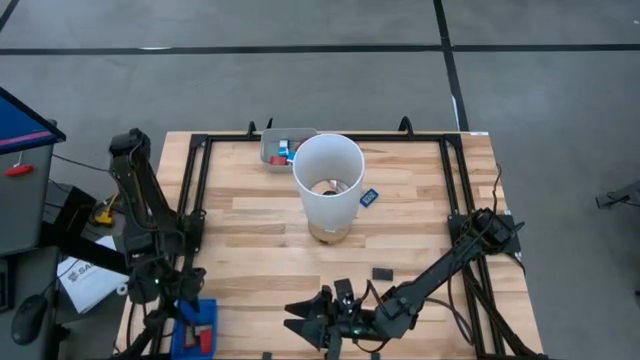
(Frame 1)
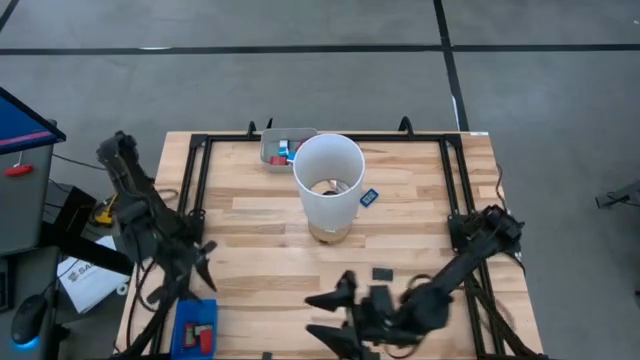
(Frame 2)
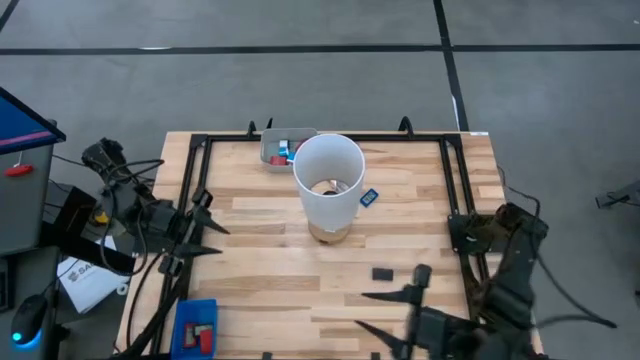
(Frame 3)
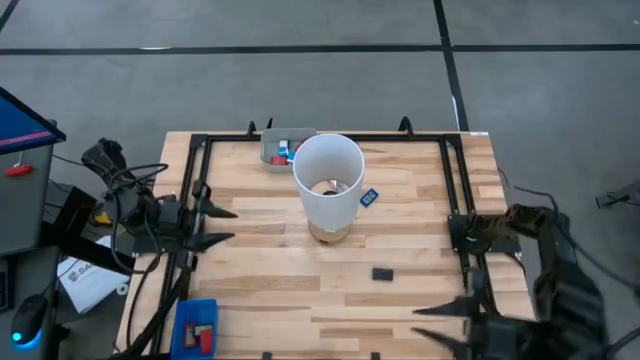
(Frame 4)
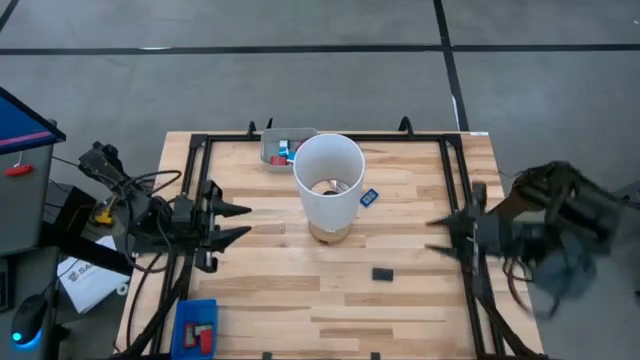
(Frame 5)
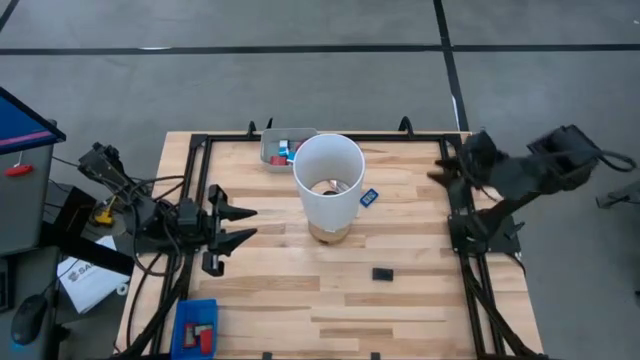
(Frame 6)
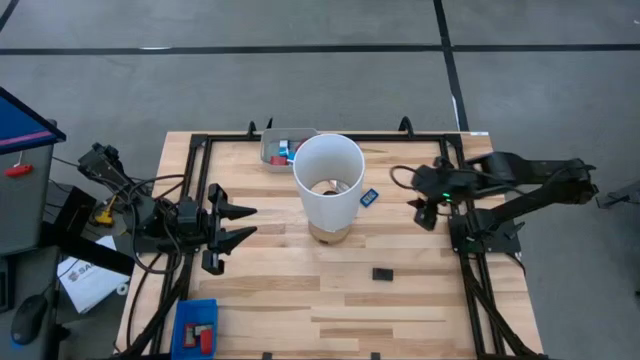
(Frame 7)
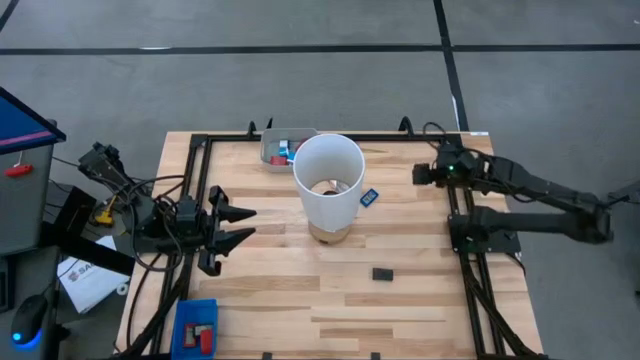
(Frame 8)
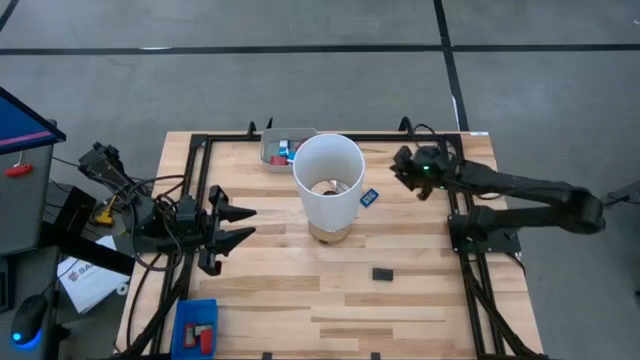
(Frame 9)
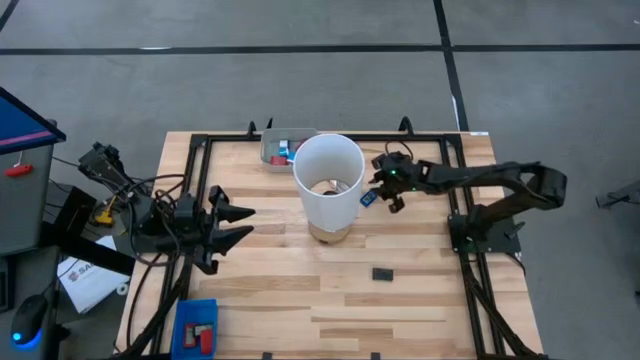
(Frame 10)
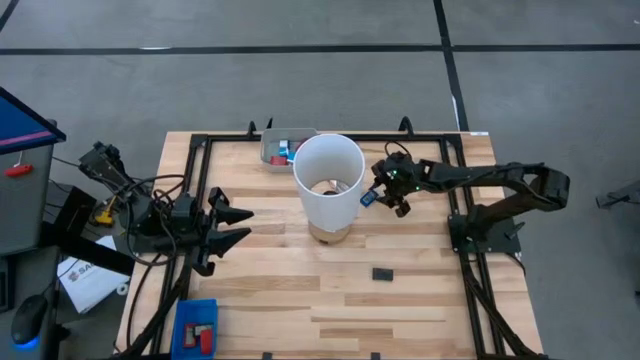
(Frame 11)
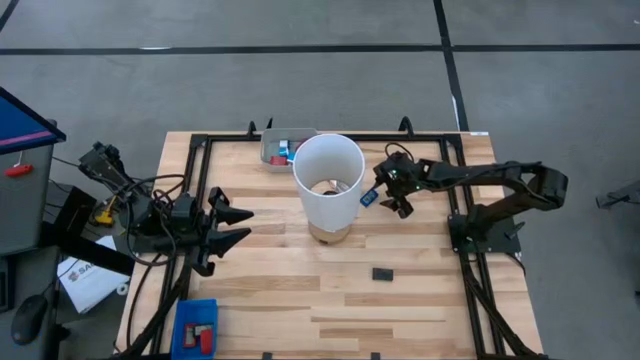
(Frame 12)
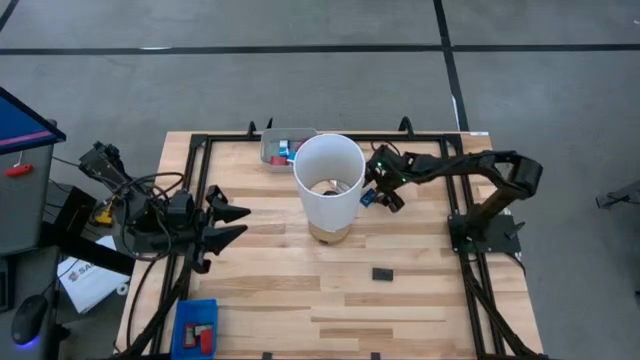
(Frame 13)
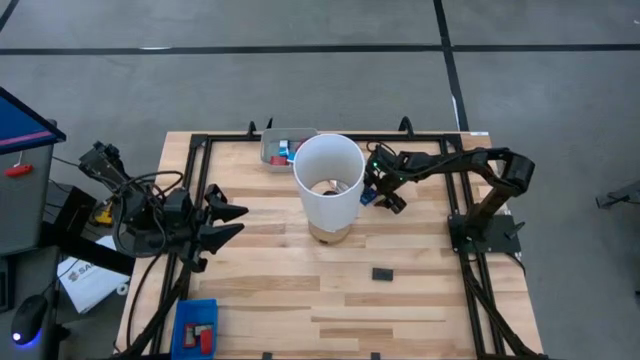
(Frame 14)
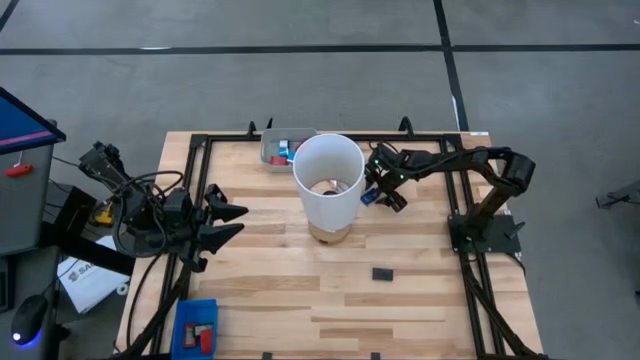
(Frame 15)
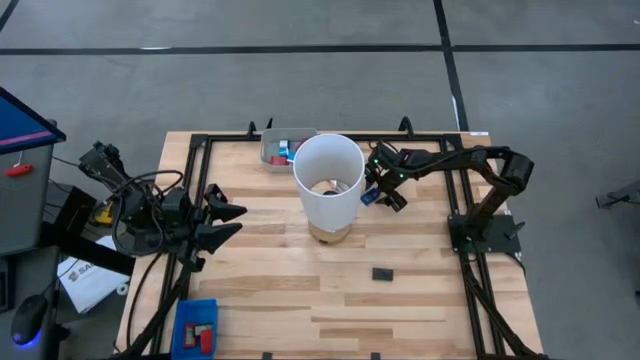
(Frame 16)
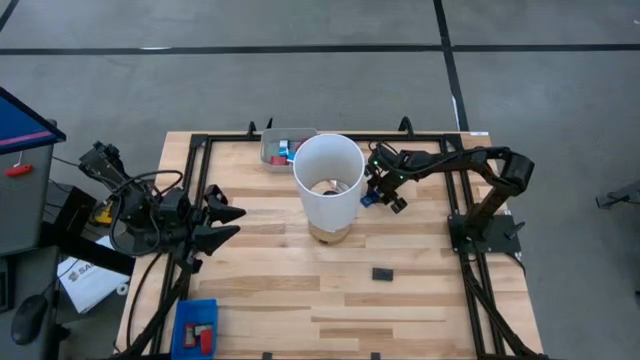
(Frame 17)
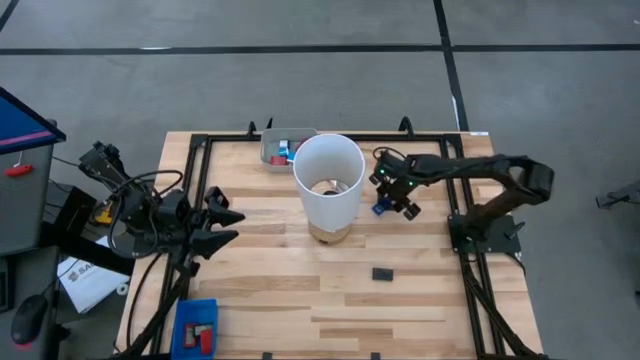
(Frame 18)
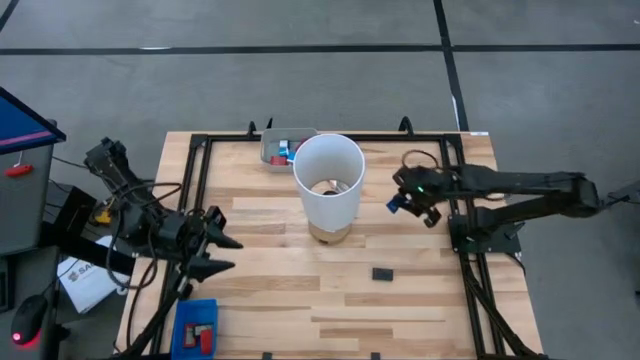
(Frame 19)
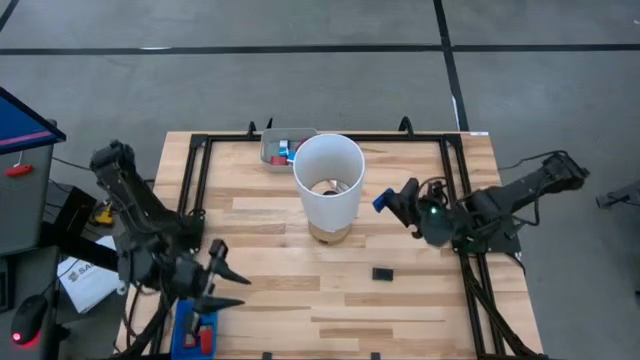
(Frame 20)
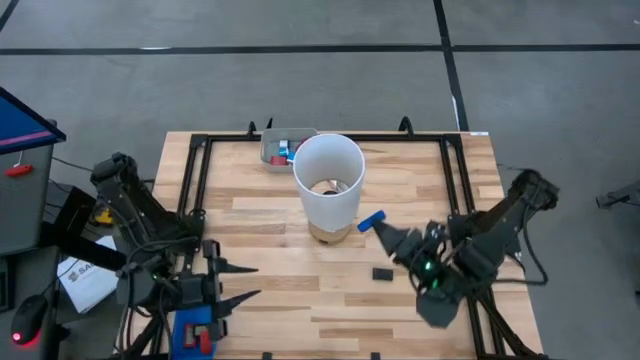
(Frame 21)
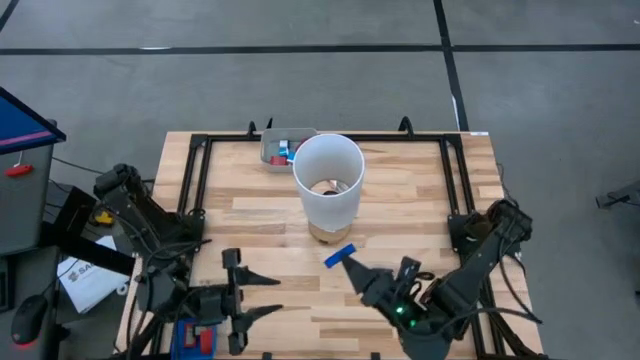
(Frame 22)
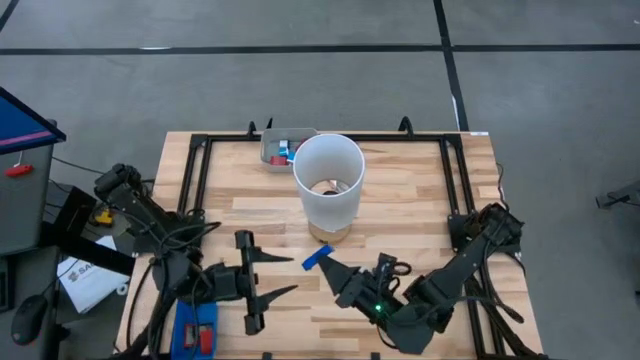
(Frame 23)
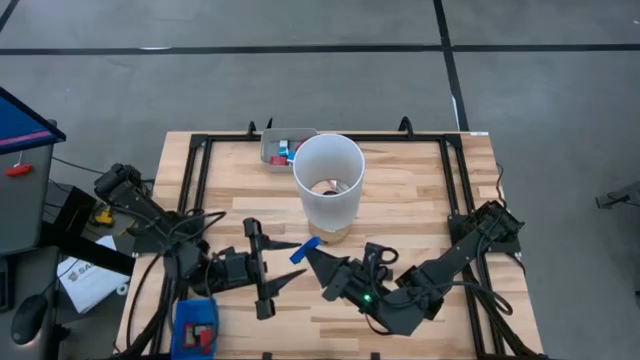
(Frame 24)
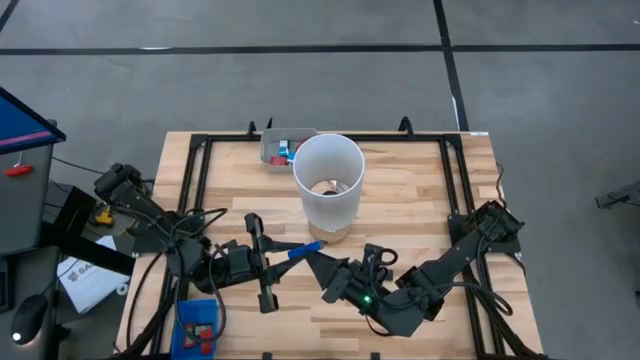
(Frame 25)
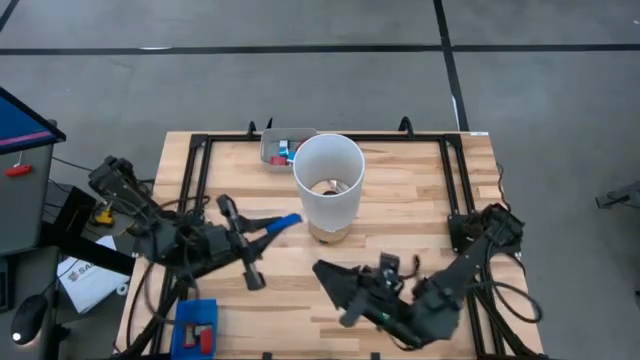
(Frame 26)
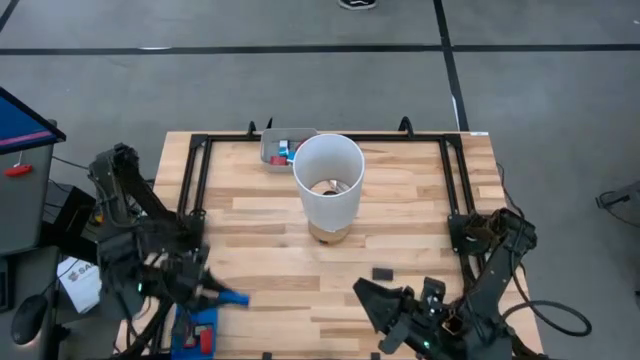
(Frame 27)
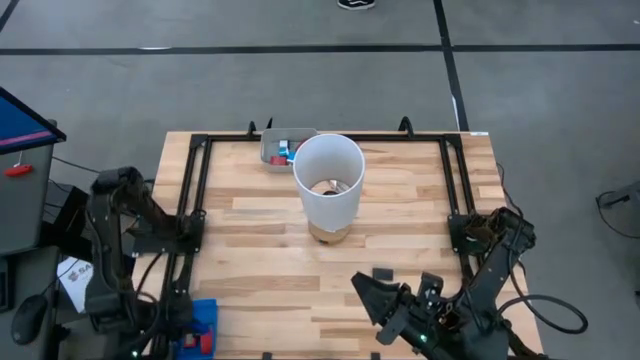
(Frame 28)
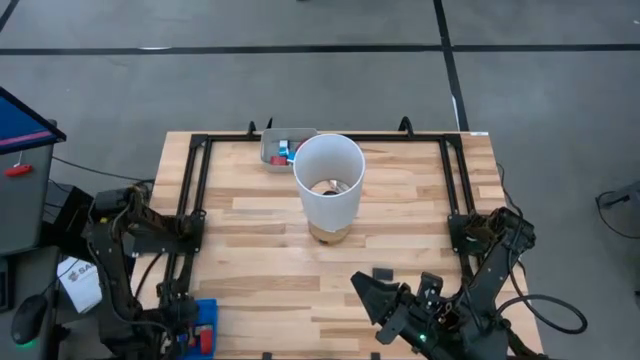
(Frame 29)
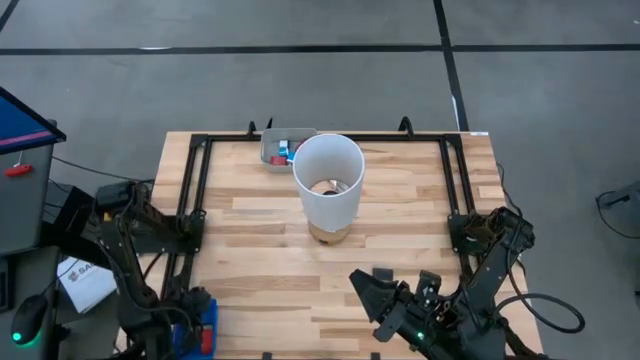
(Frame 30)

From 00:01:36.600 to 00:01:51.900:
Task: Pick & Place Office items
Put the blue digital timer into the blue bin

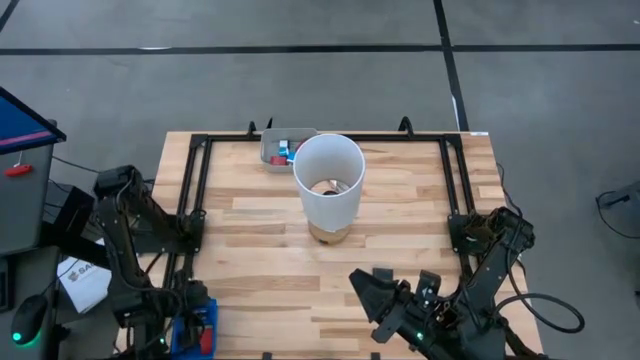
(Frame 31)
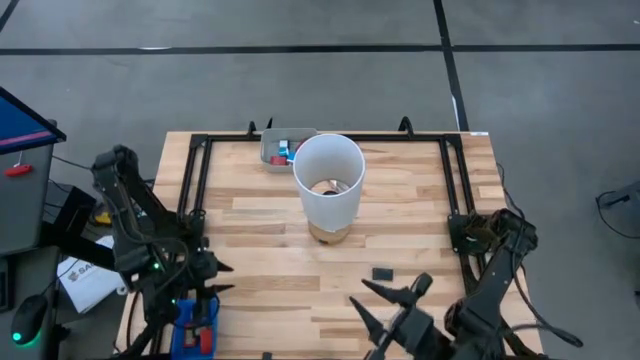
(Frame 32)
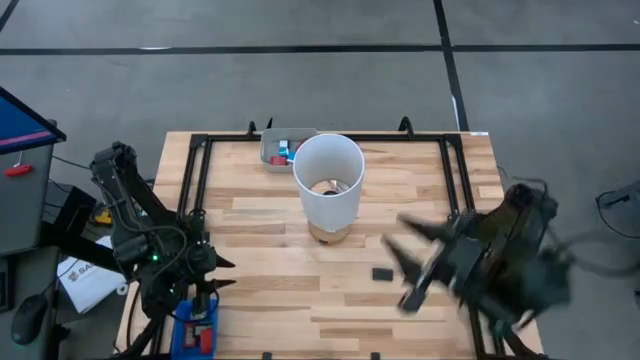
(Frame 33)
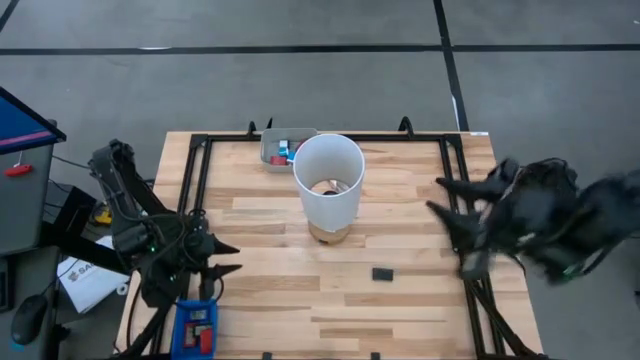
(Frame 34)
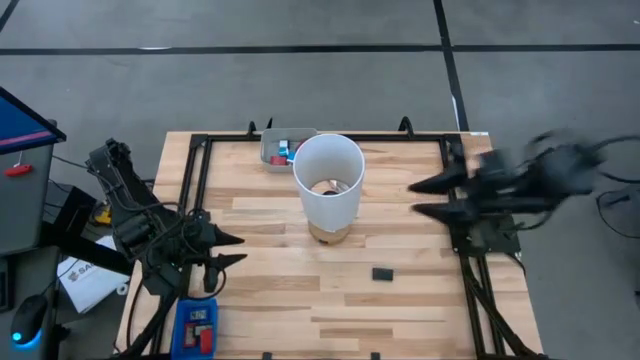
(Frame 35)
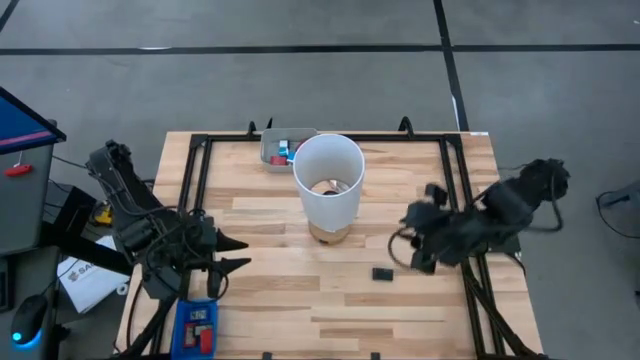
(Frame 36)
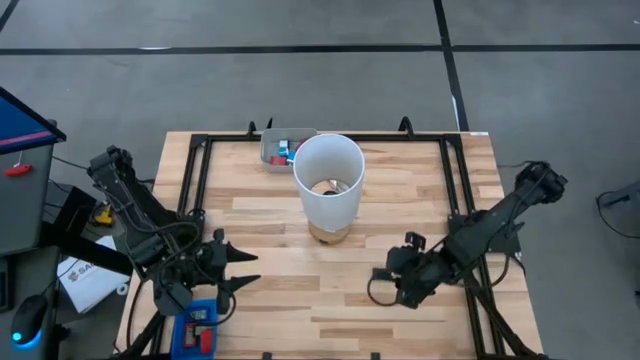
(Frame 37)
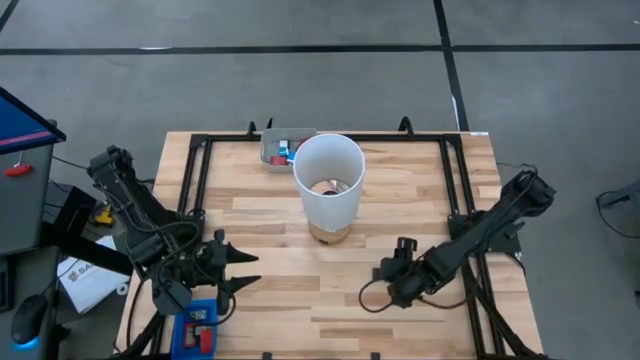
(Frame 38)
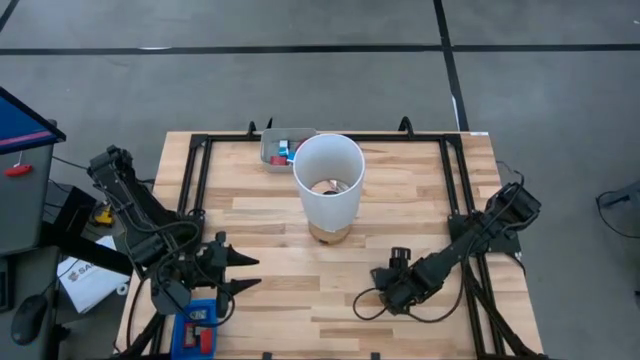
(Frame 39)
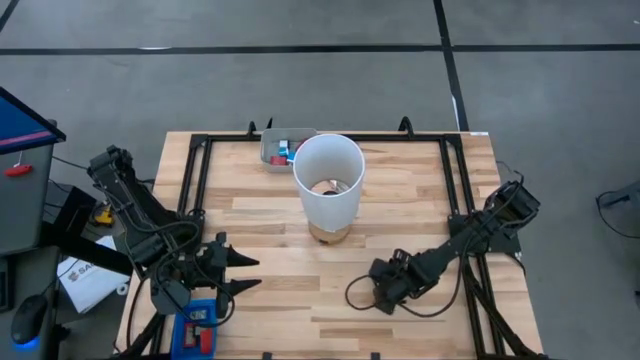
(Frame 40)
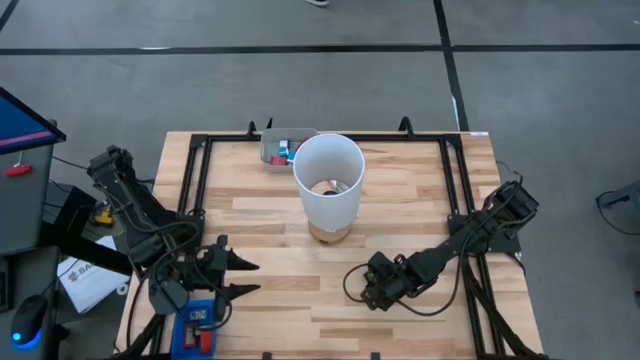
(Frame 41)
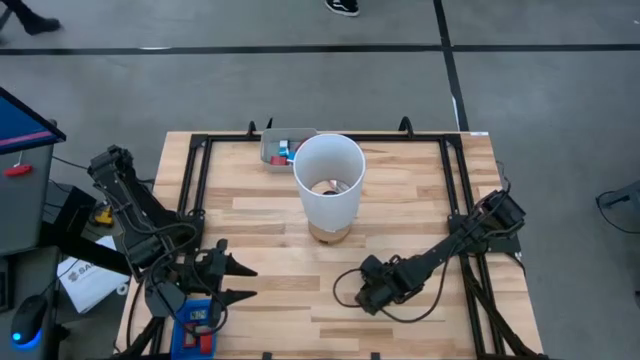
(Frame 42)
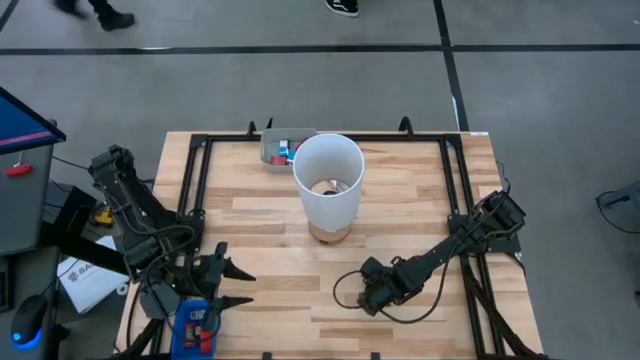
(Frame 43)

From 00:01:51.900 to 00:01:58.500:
Put the black digital timer into the blue bin
